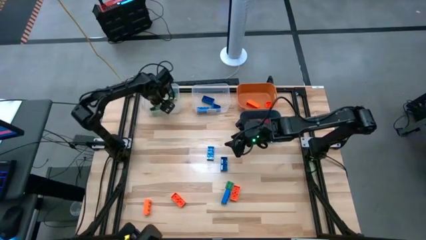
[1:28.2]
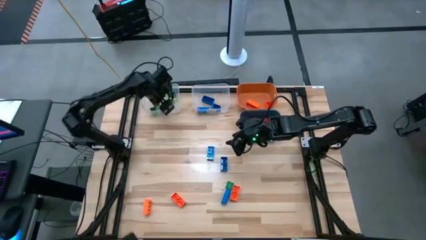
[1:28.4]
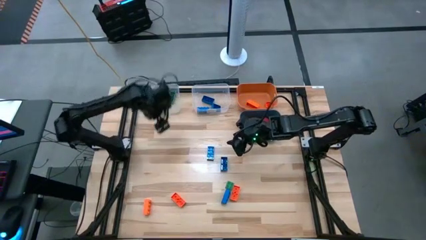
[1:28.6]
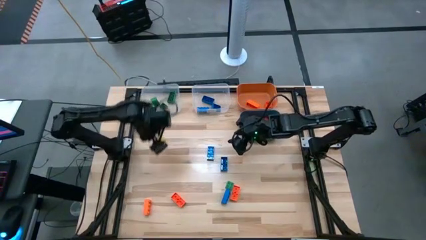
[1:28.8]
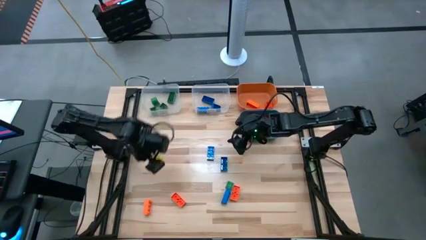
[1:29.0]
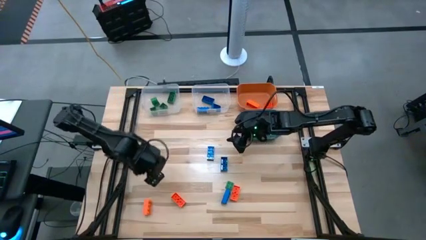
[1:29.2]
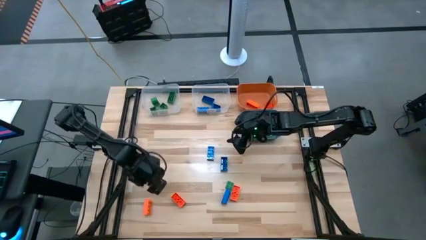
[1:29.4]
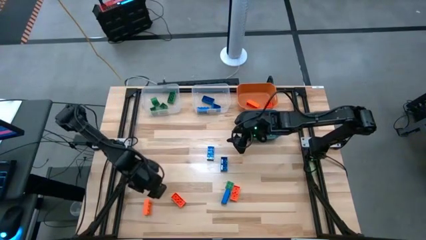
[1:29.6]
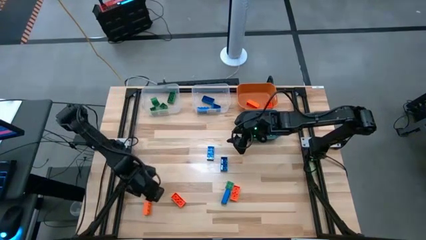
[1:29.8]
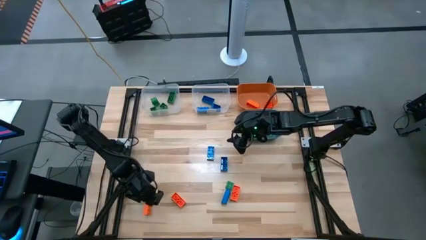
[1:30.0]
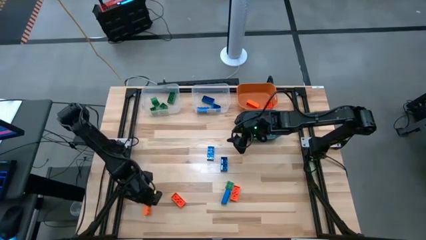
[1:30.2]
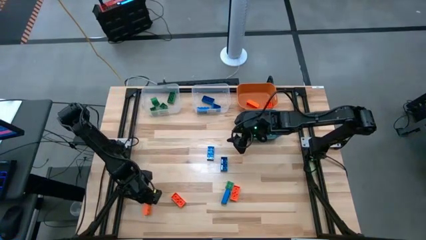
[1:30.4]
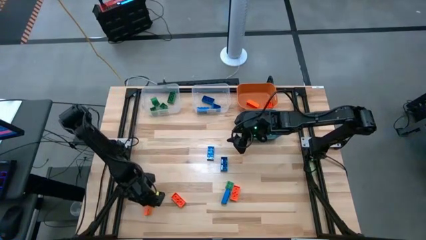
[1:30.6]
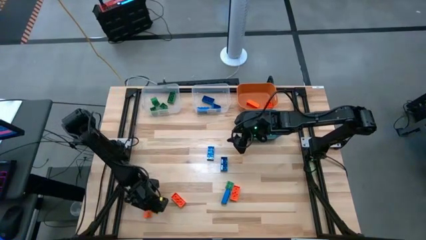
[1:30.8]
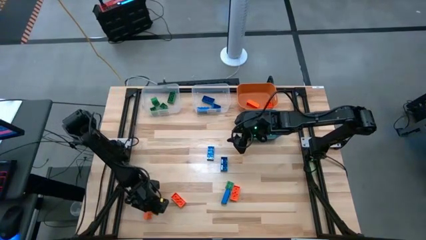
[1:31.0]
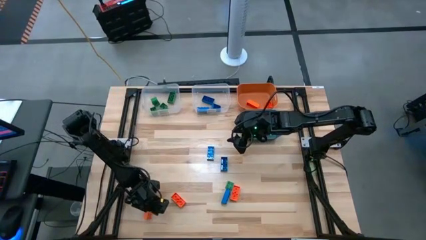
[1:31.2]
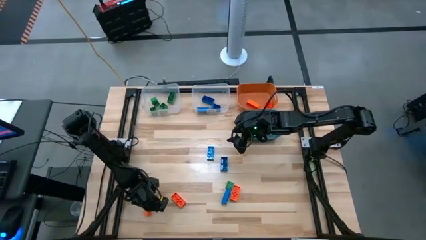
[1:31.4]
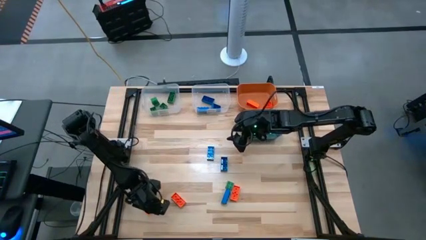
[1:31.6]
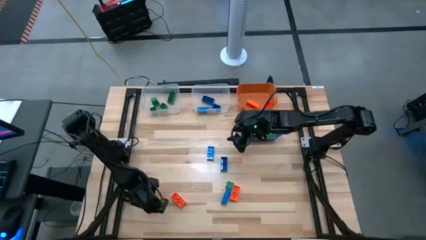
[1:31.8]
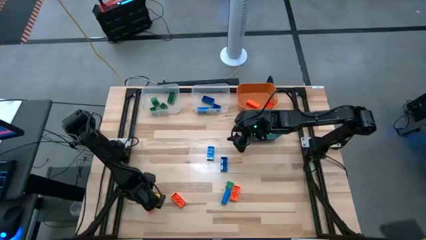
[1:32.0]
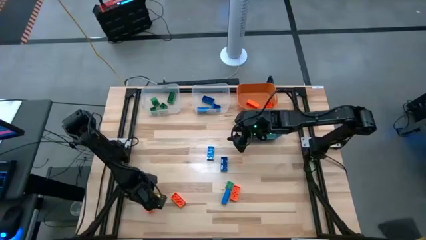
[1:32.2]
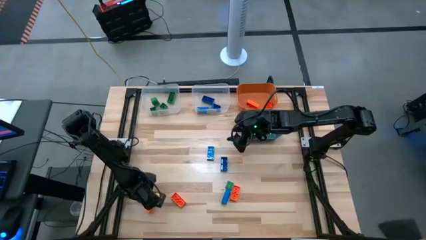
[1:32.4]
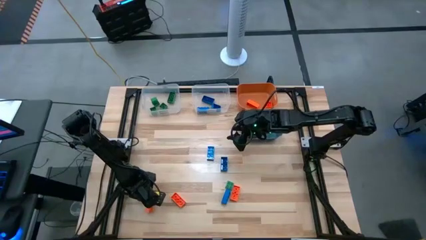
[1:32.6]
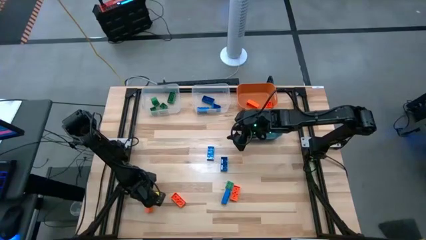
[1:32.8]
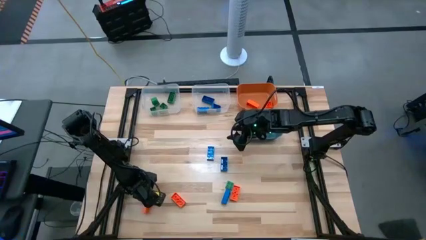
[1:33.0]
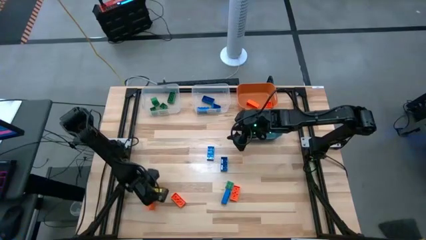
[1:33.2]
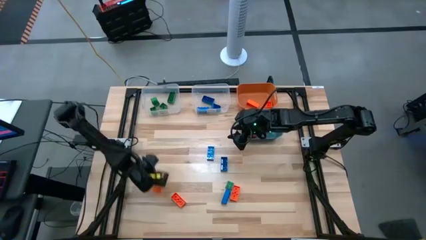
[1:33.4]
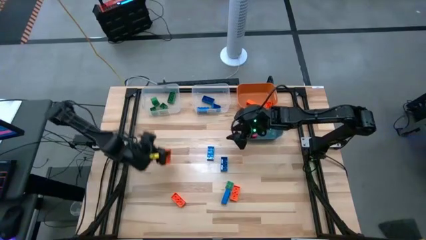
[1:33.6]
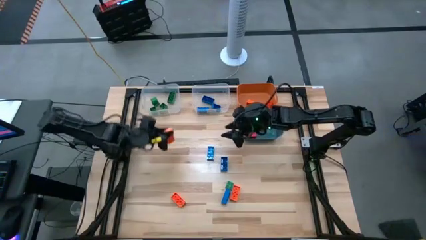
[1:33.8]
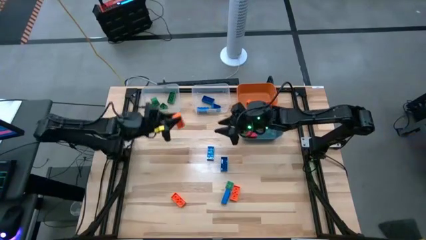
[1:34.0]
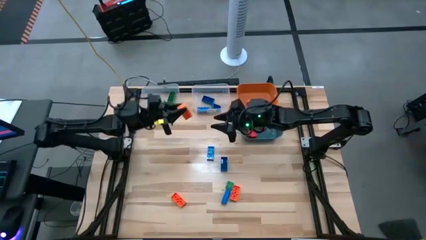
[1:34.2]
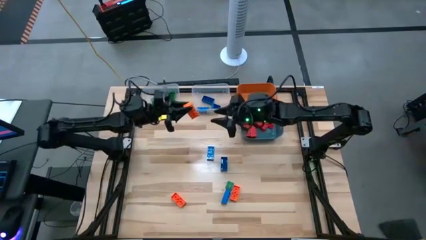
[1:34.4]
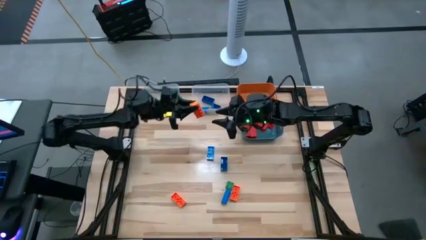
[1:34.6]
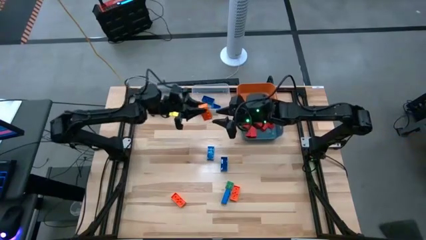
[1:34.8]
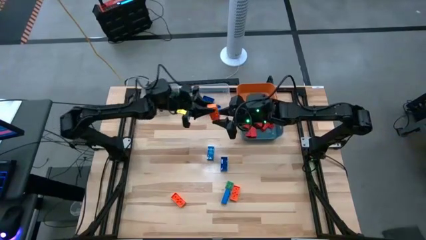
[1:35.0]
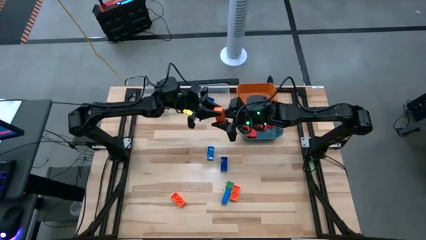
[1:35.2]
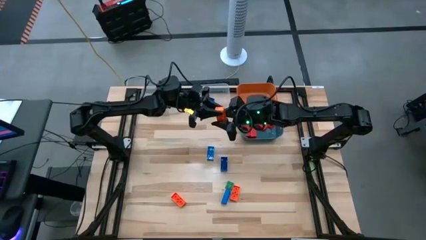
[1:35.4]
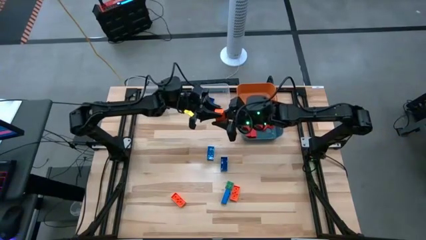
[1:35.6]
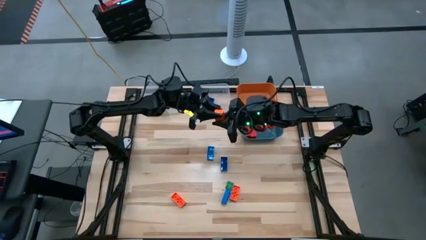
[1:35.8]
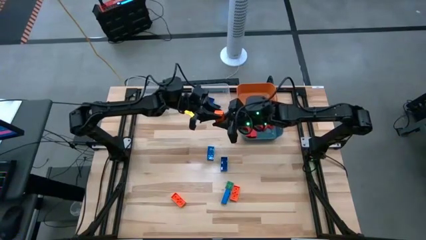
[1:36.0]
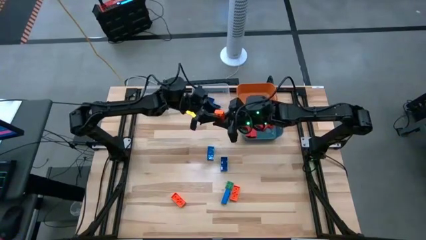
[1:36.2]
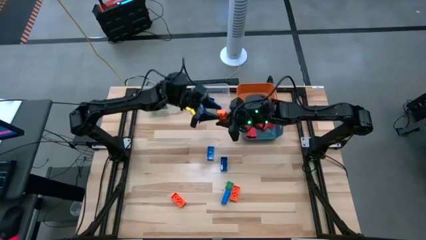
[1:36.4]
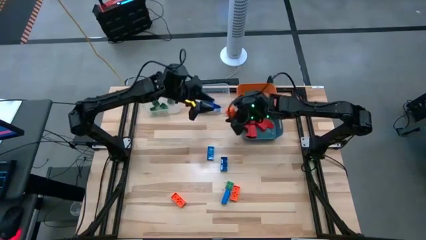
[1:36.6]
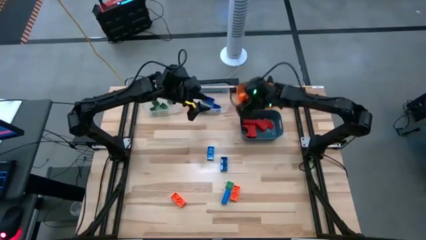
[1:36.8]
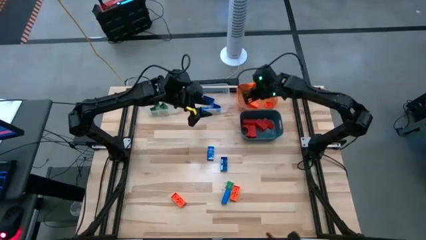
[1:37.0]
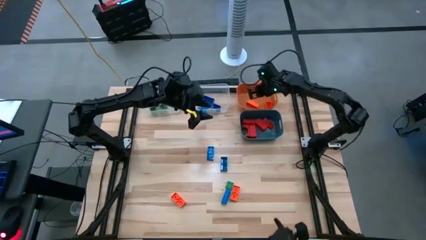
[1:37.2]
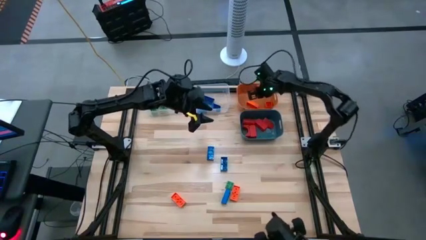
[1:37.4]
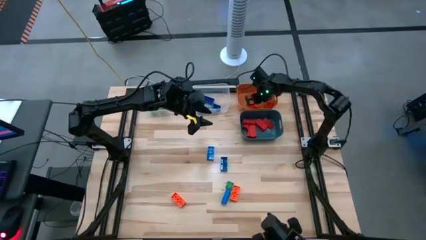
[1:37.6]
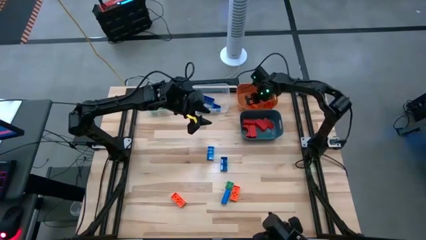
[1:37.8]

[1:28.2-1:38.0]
Task: Sort blocks
Put the orange game piece into the orange bin

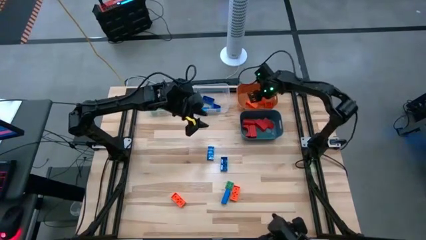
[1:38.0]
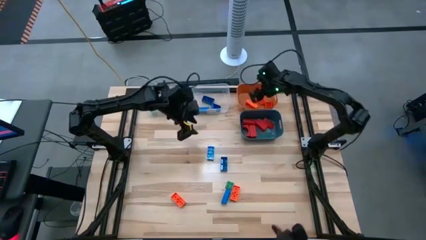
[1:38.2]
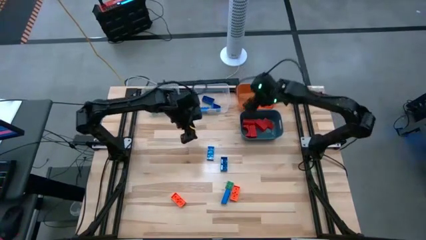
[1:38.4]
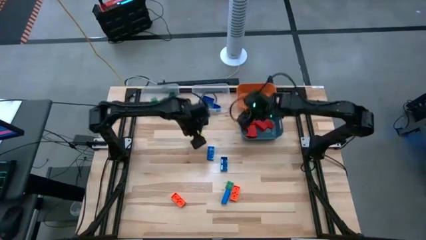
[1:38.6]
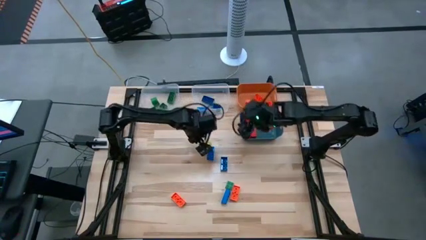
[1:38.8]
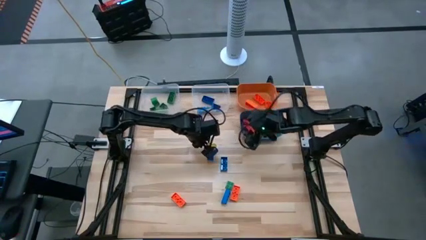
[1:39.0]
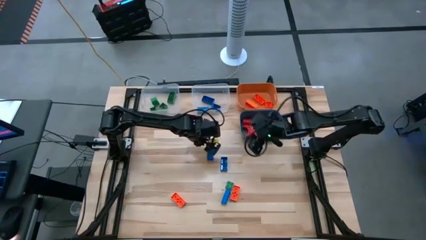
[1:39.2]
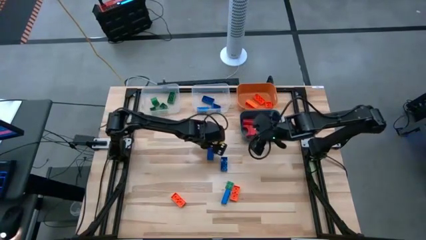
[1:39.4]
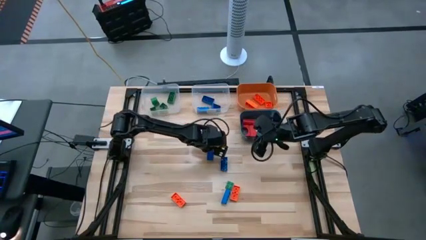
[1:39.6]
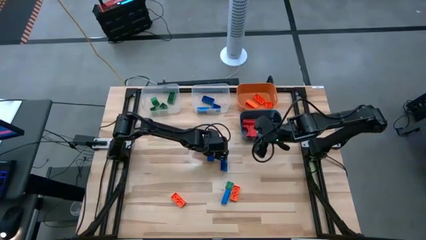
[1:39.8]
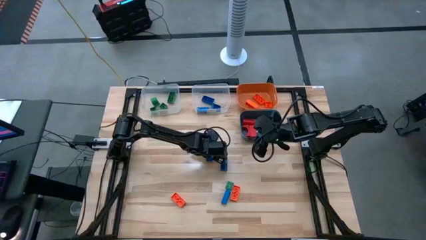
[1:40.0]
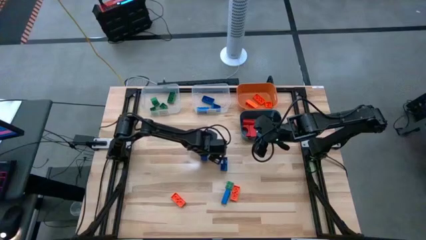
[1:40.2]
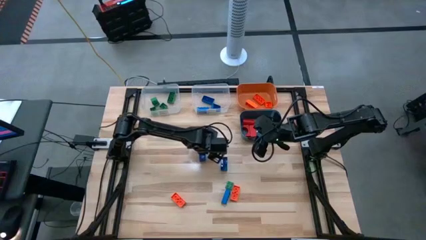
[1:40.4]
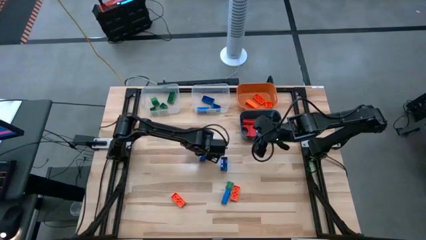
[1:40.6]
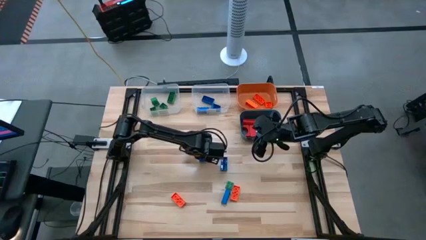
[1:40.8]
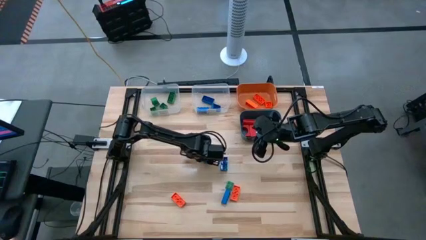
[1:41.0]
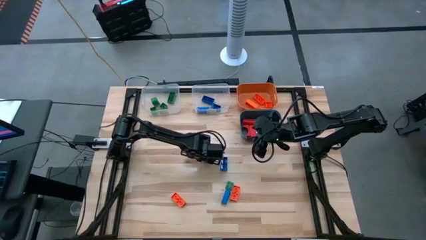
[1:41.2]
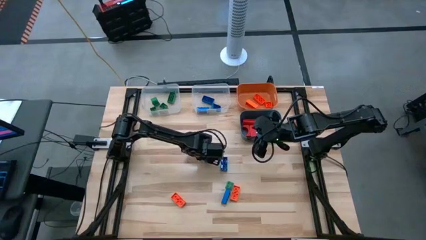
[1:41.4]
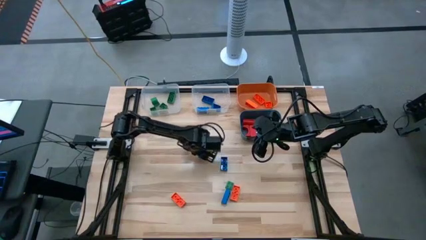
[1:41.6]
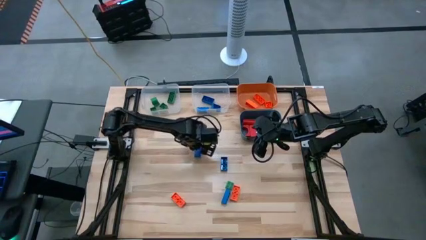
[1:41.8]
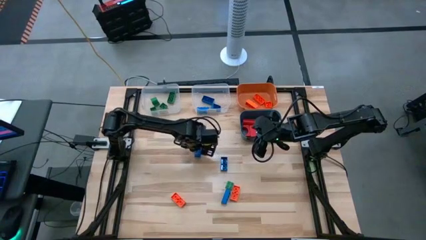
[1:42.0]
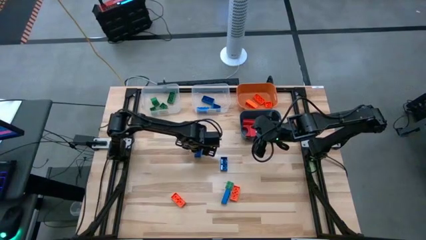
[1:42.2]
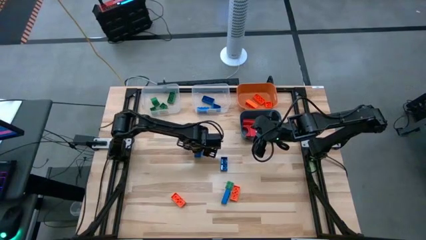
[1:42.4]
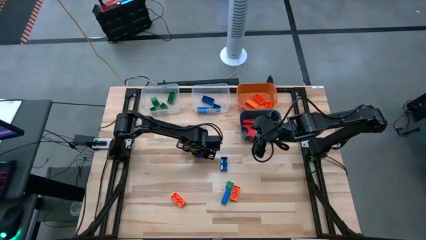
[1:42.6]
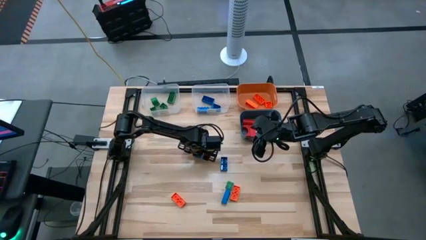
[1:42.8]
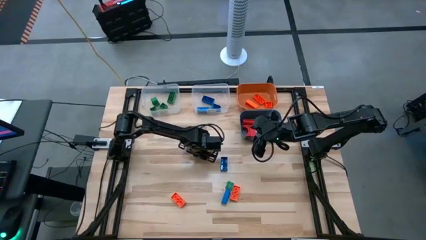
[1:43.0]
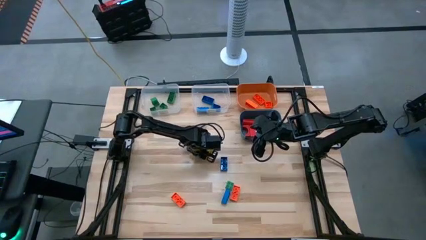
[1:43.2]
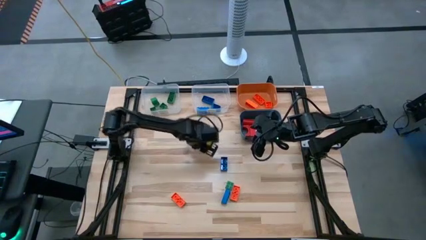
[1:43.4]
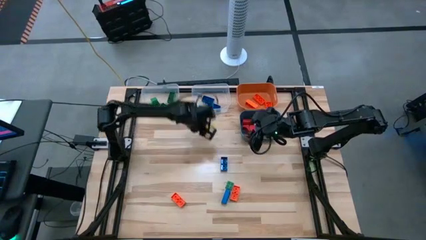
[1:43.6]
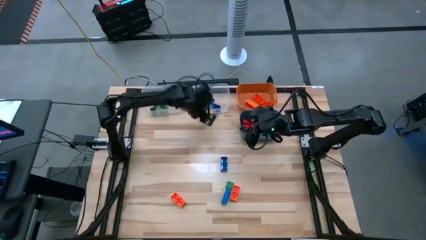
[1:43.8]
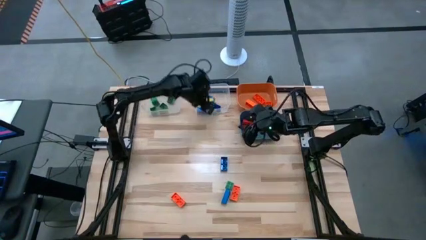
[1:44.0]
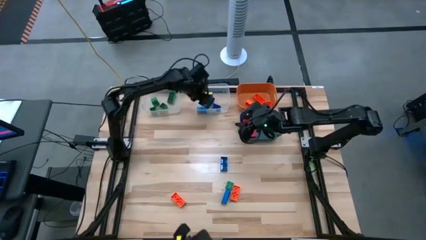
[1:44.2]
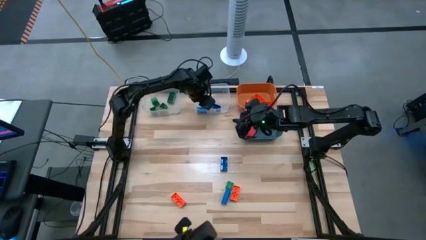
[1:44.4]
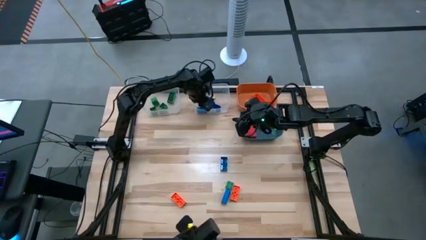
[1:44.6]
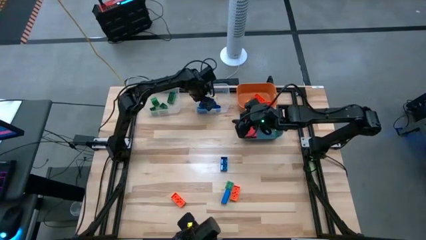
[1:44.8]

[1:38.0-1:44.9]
Put the blue game piece into the right transparent bin
